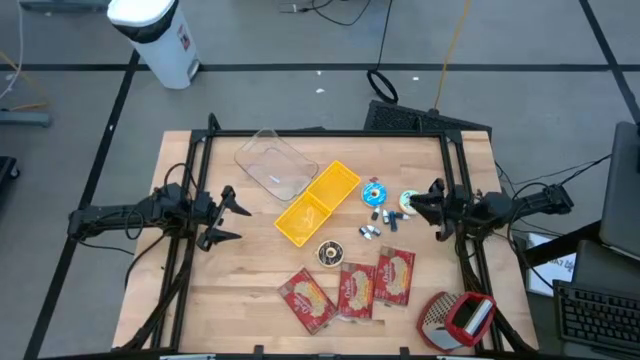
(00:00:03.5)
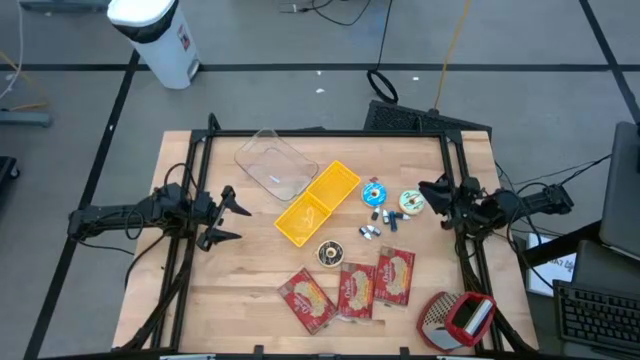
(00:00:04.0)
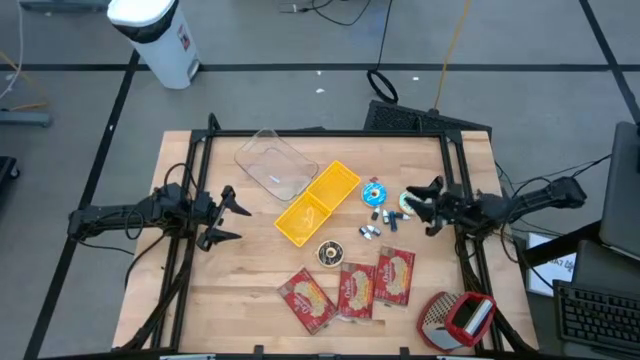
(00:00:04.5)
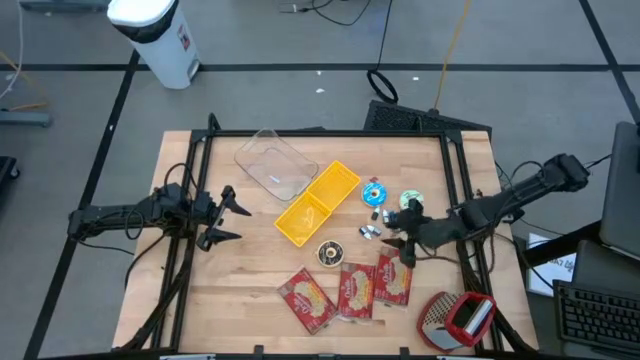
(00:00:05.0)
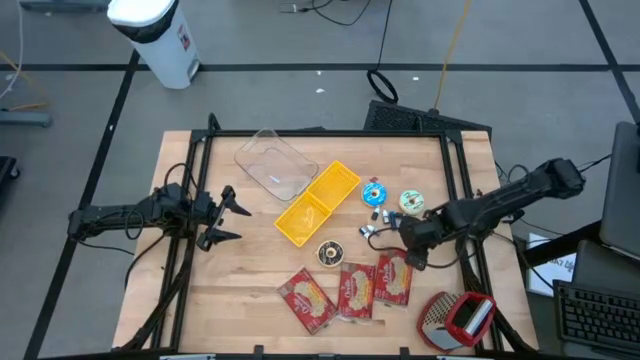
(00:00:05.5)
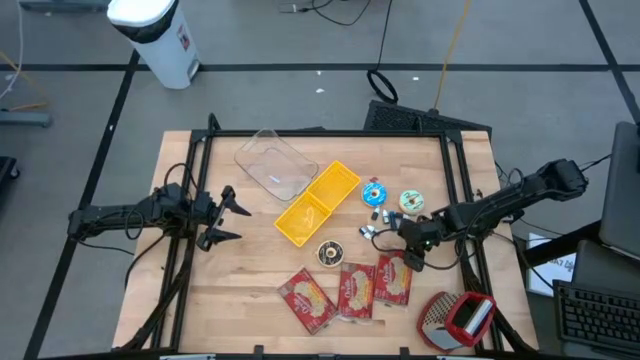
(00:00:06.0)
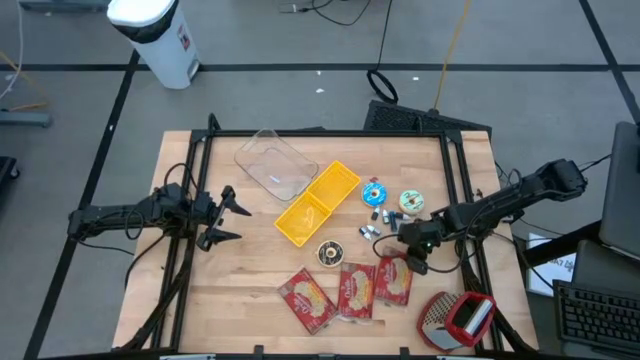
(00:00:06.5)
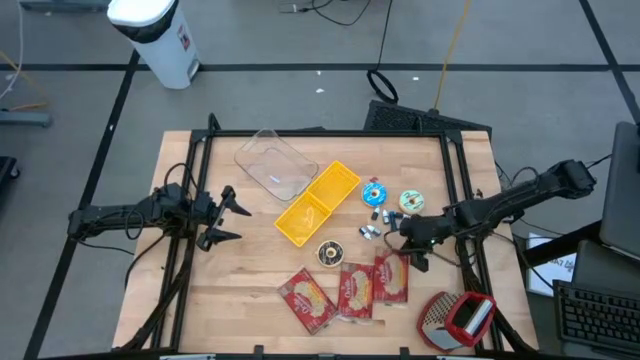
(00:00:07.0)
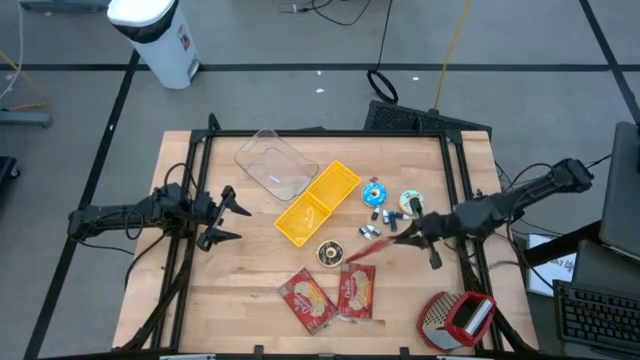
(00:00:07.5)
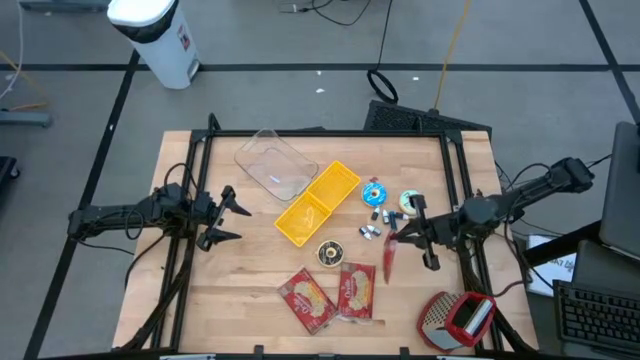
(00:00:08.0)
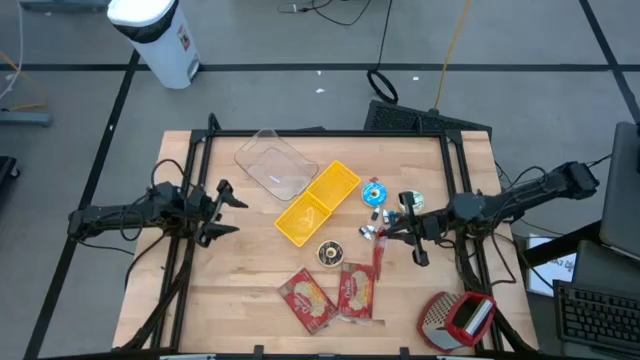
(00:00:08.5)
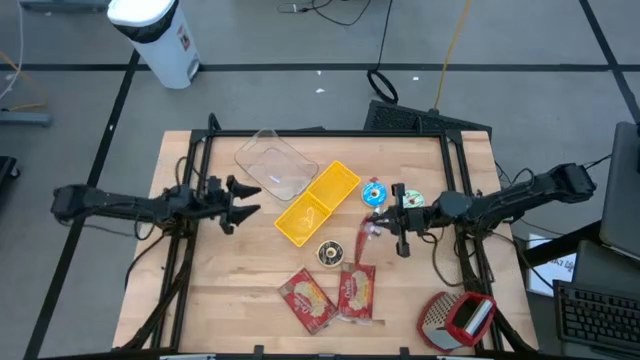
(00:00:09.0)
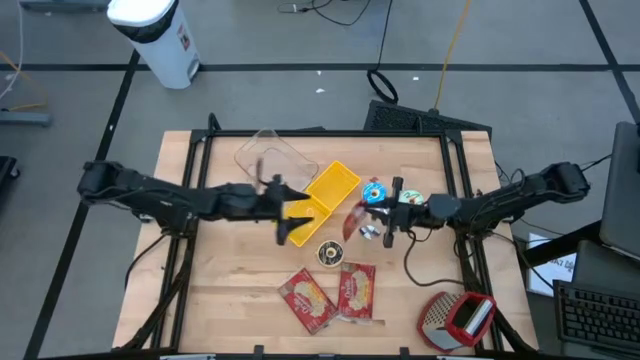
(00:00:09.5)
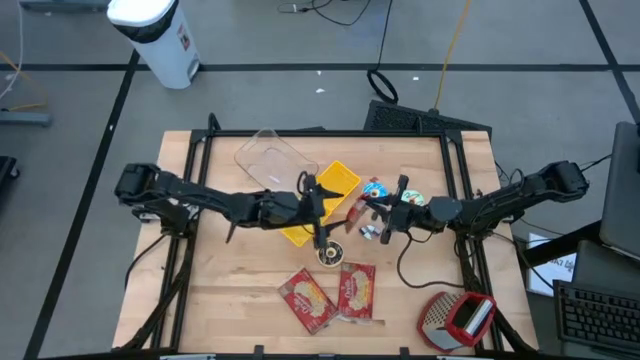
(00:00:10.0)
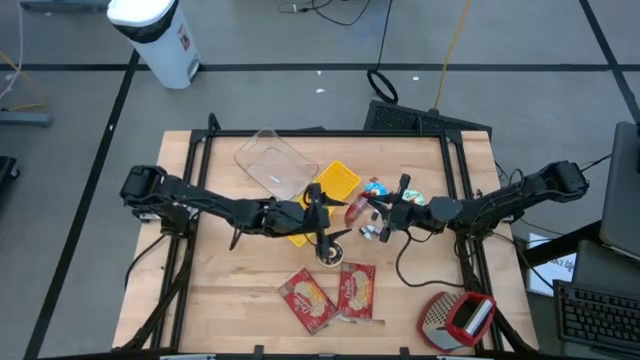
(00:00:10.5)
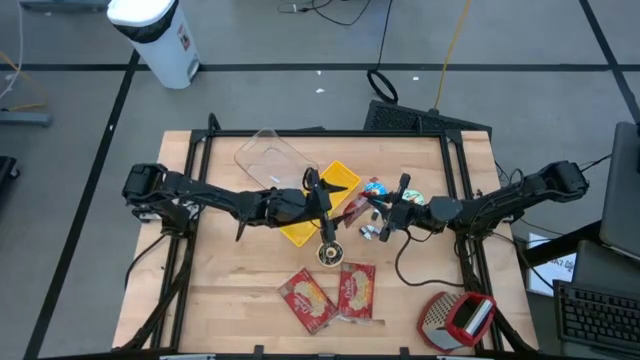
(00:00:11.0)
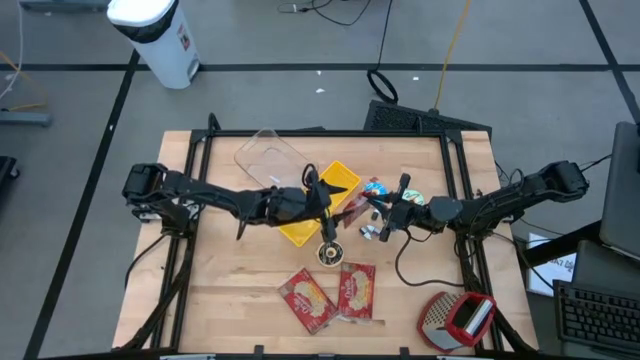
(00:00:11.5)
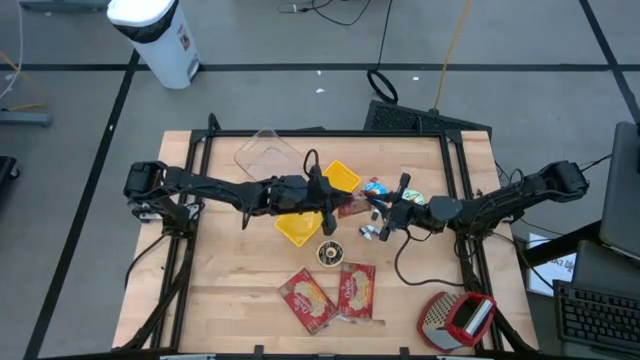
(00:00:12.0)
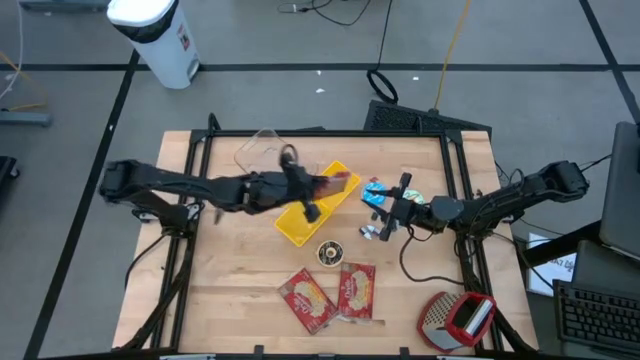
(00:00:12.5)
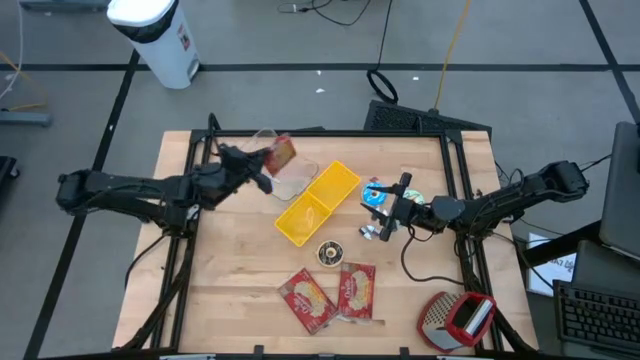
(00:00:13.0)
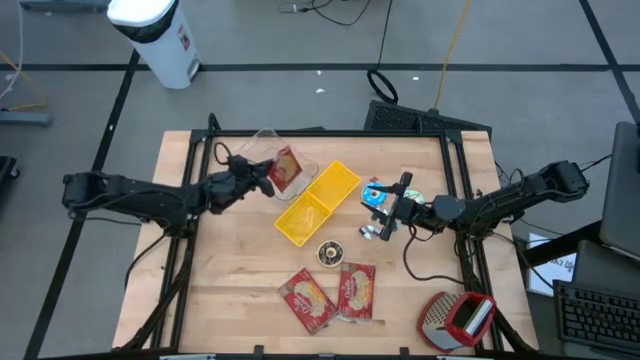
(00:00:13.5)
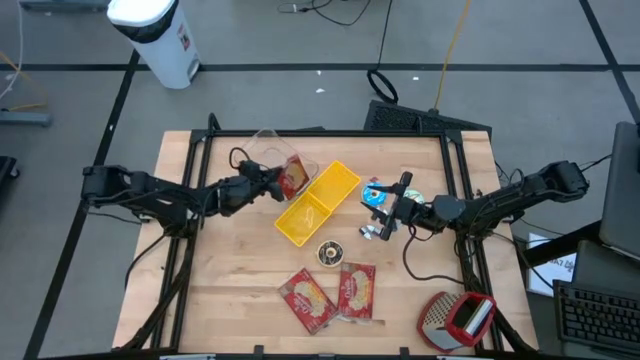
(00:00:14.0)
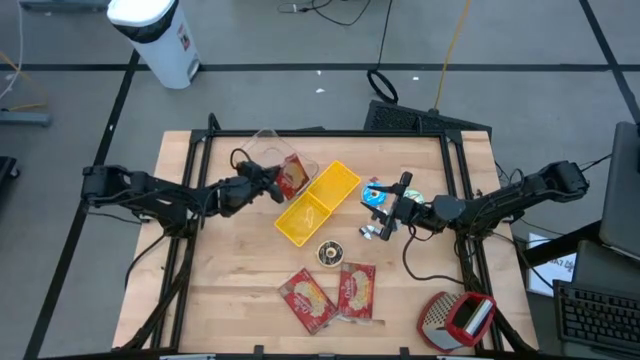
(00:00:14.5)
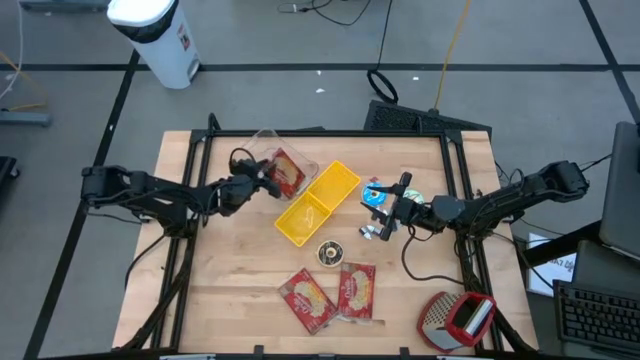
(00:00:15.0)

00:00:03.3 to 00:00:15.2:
Put the right red popcorn bag into the transparent bin
